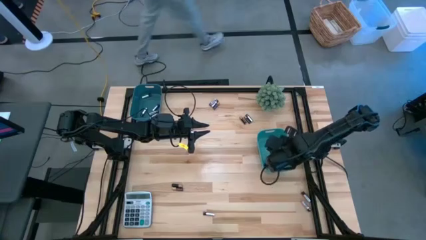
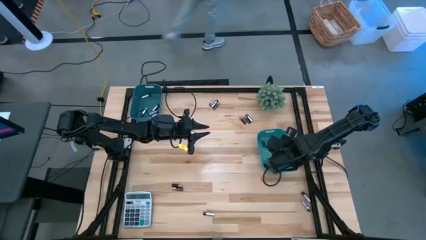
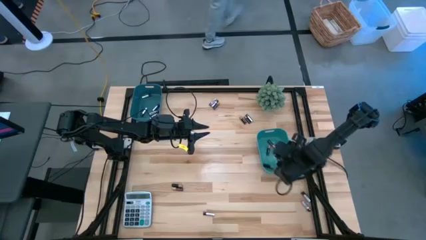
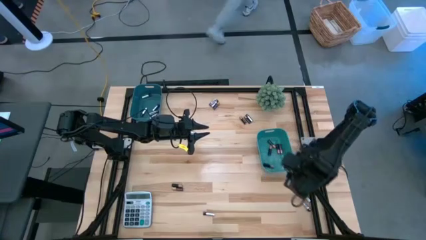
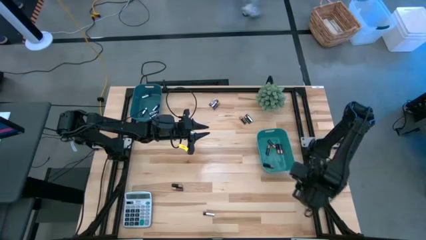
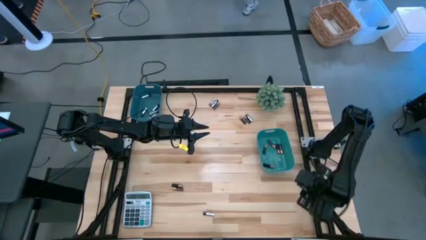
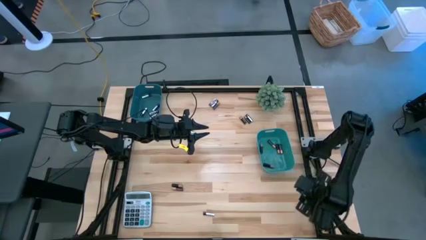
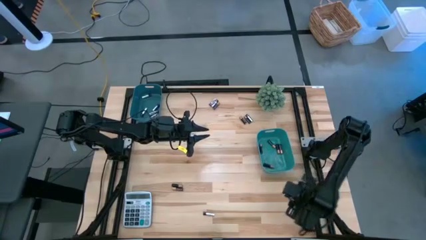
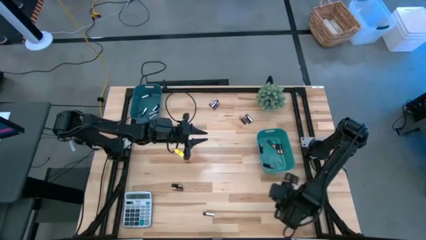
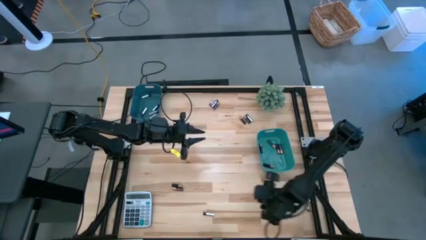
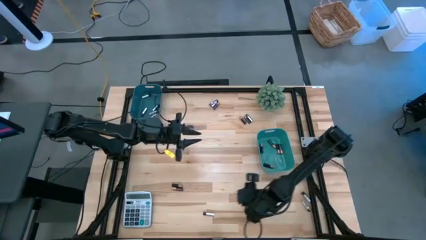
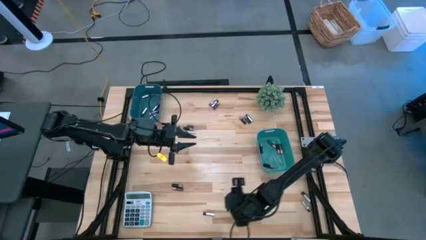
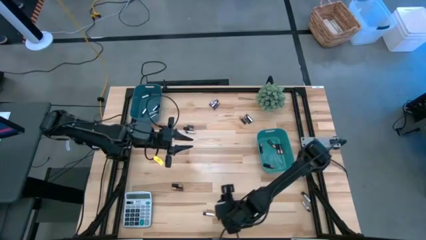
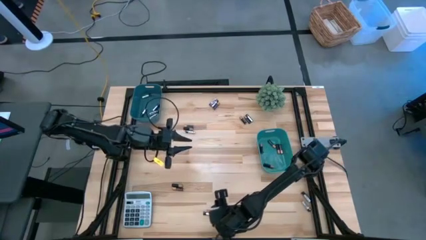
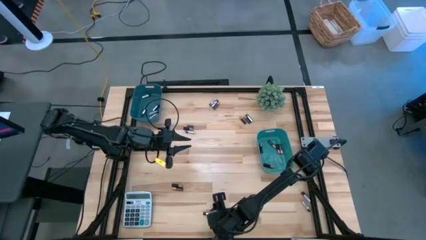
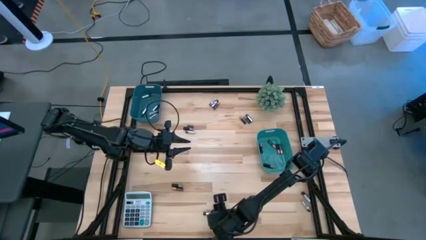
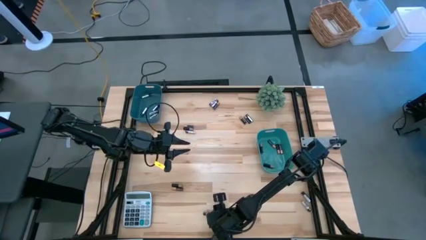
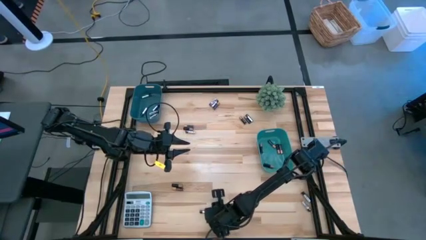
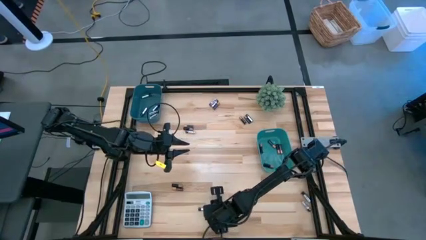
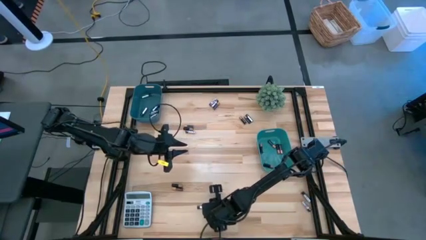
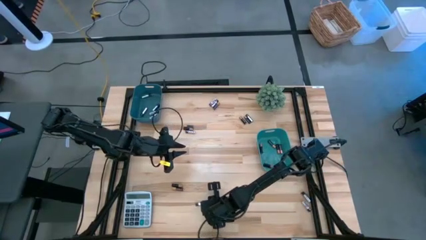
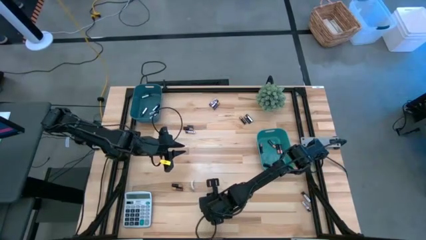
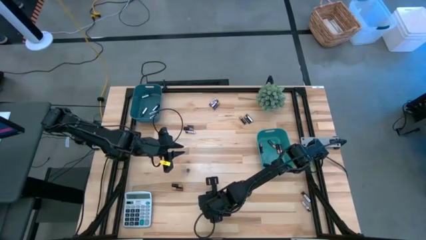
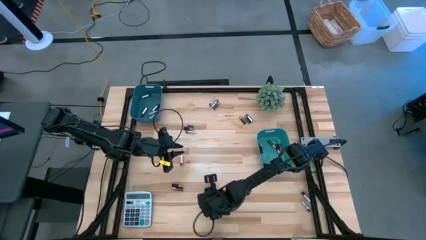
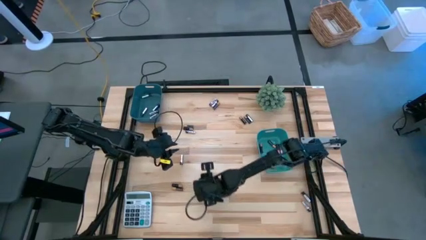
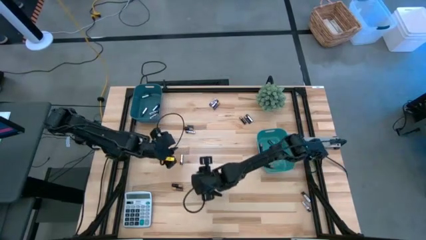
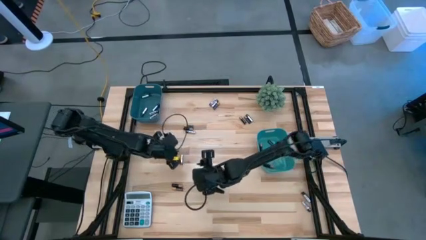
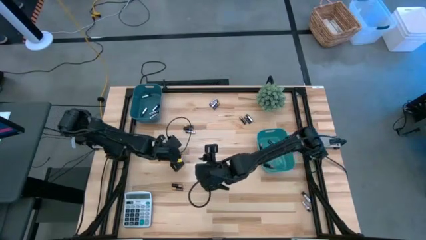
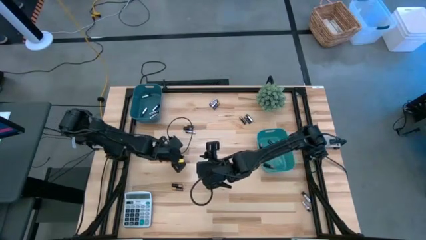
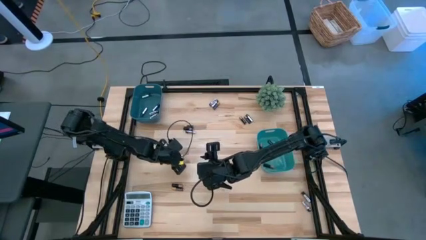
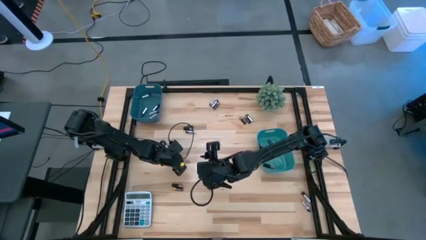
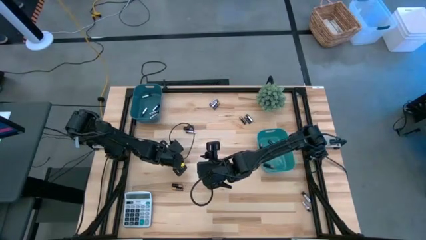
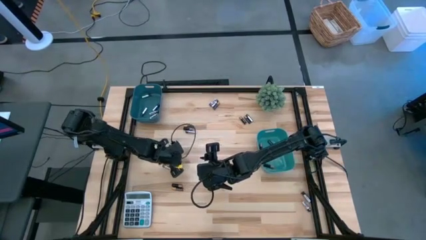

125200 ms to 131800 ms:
Task: Sort batteries
Put the black-silver battery into the blue bin

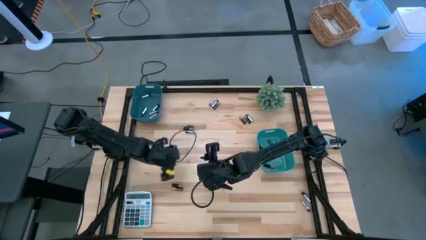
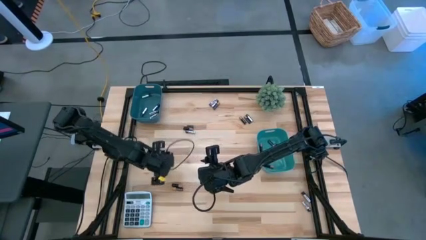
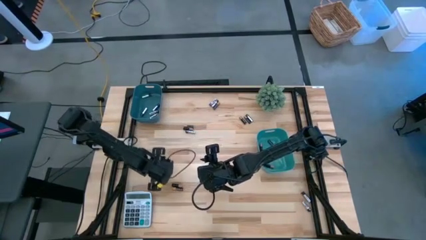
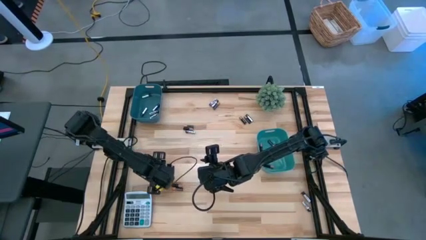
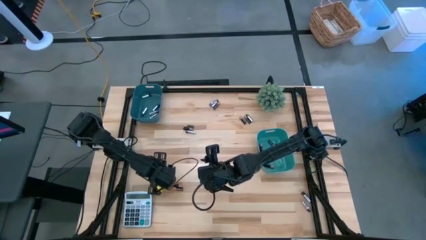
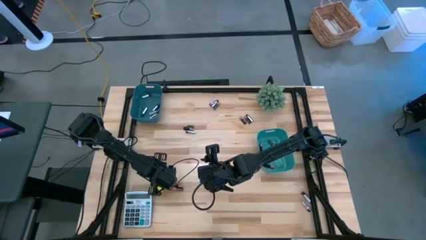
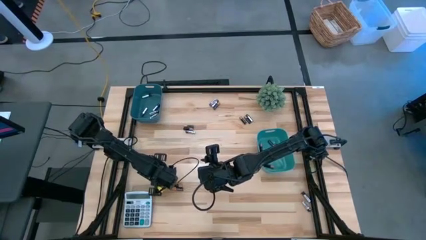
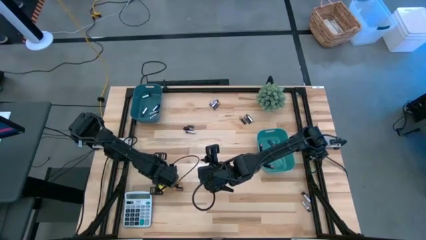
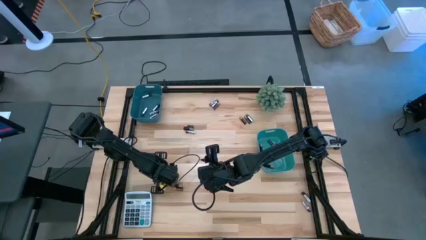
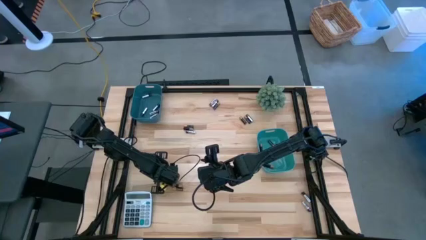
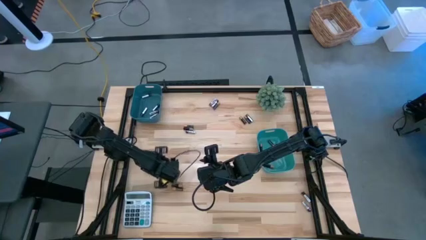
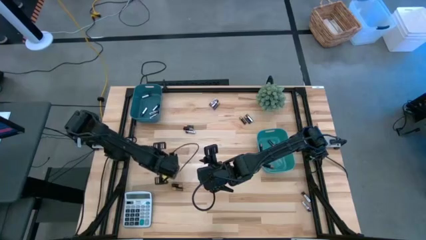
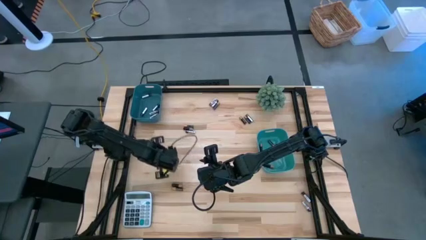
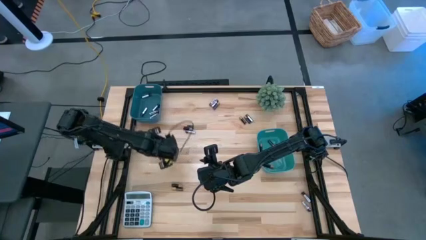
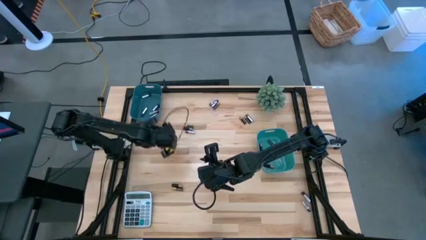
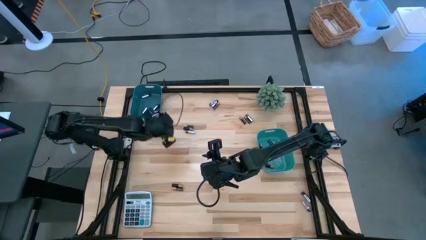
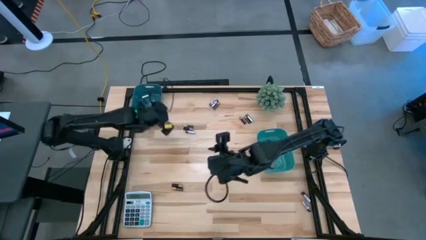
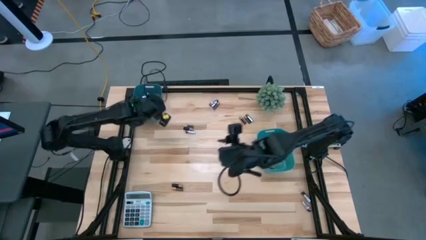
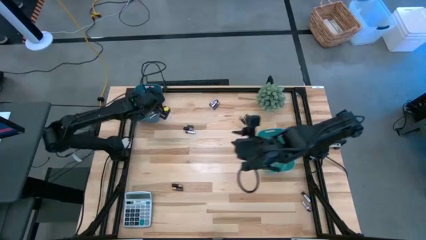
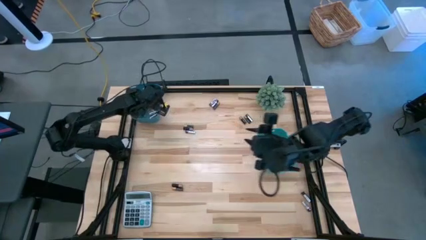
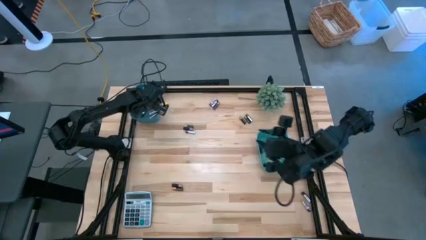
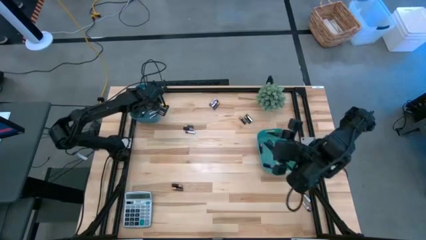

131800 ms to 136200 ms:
Put the silver battery into the blue bin
